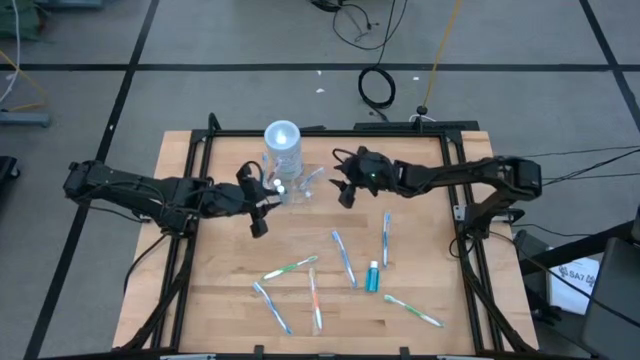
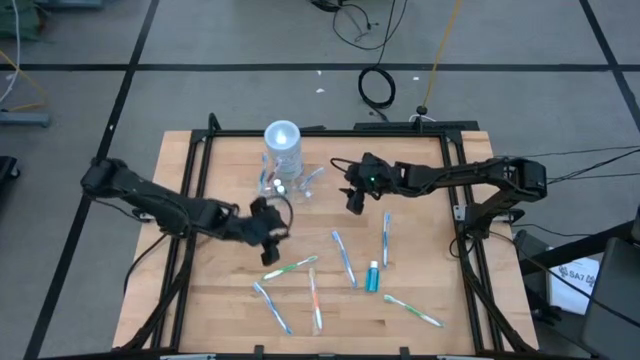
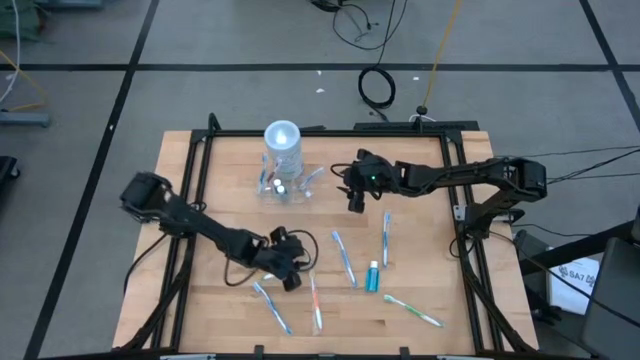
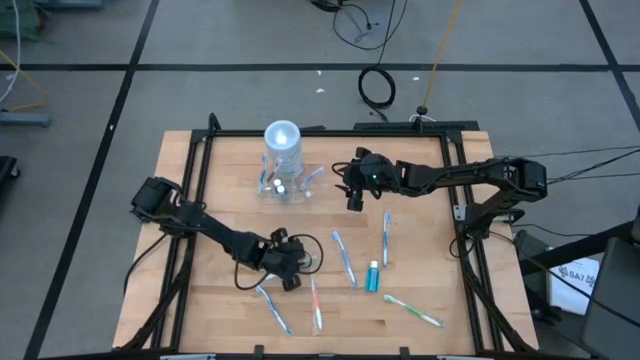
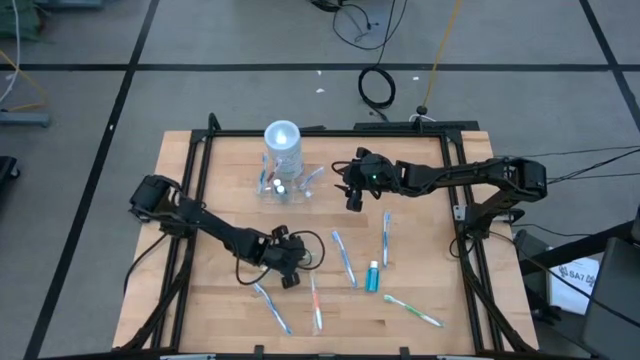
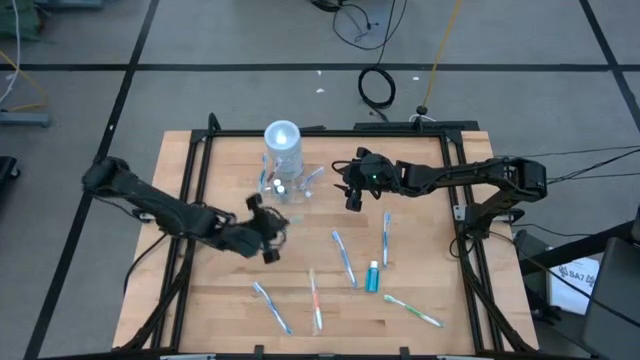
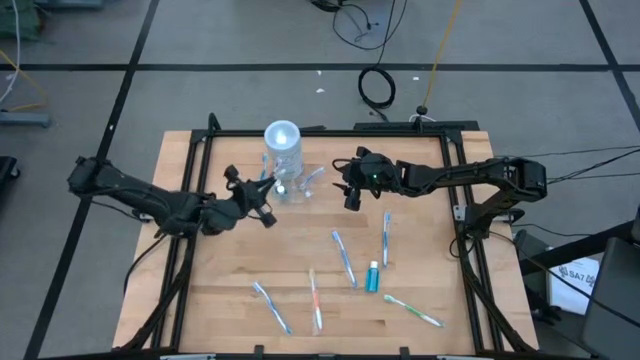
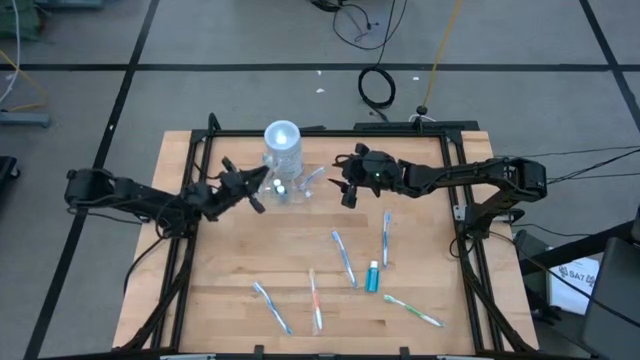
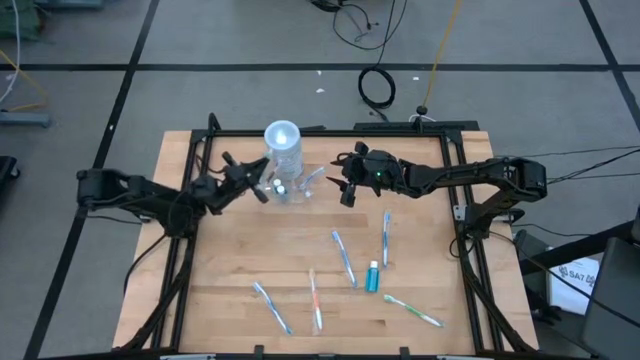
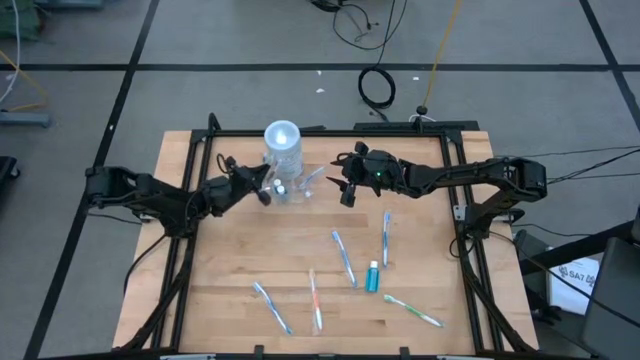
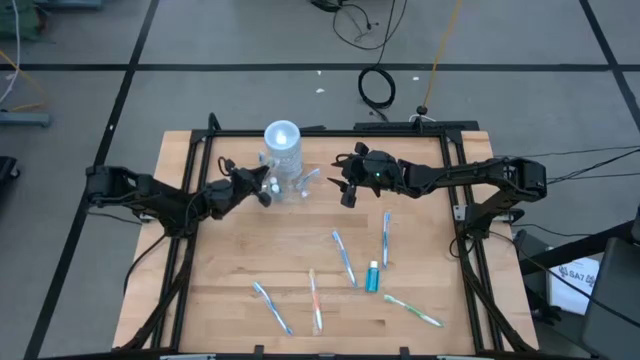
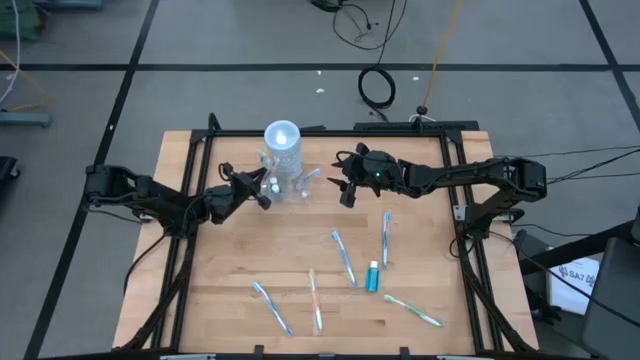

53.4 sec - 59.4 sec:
Task: Pick & Place toothbrushing station
Put the top green toothbrush into the transparent organizer

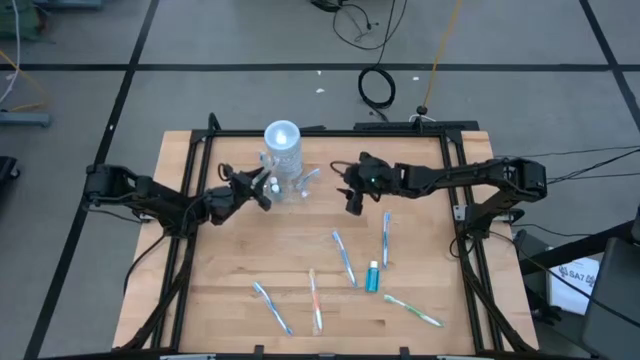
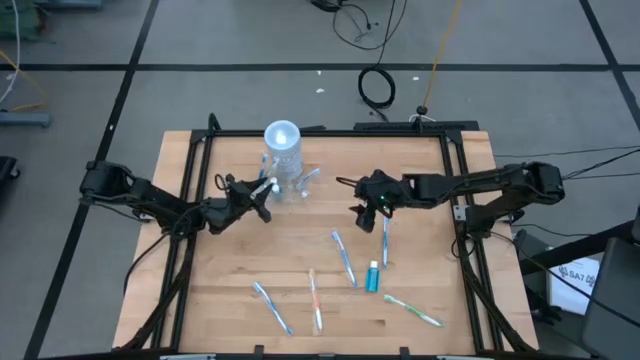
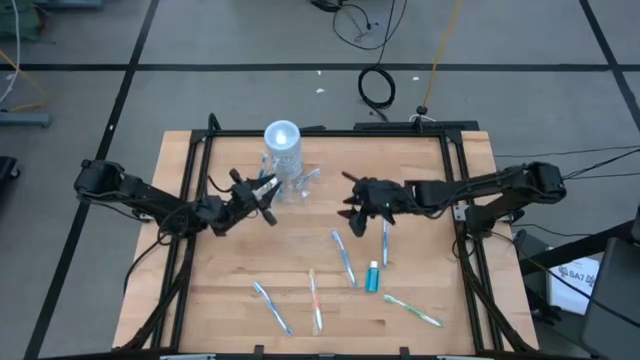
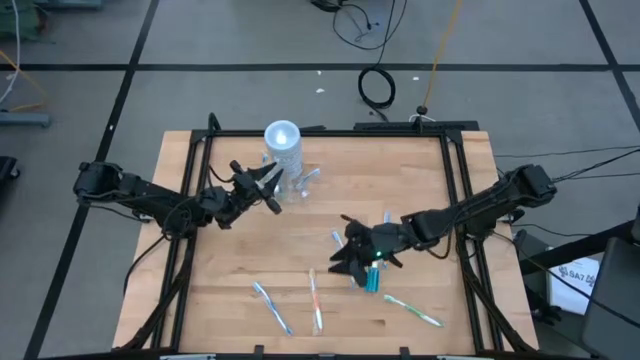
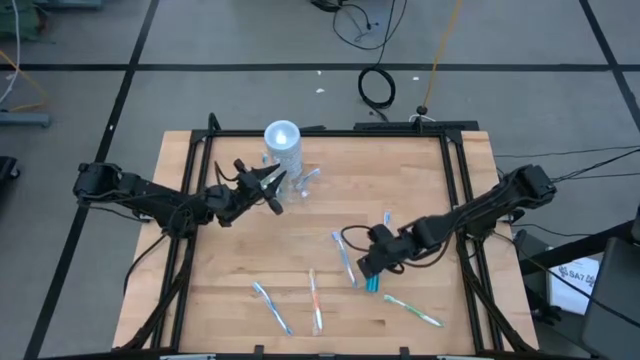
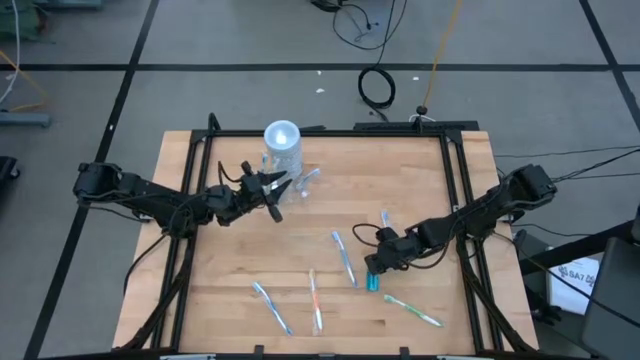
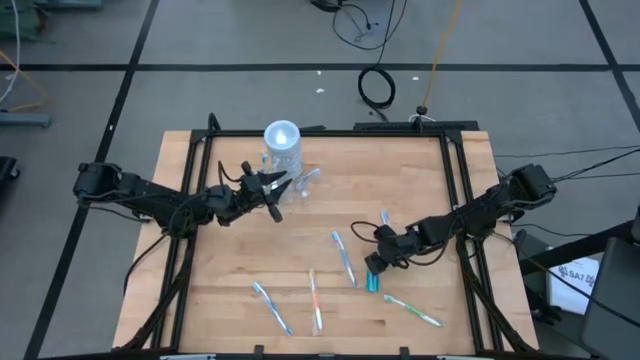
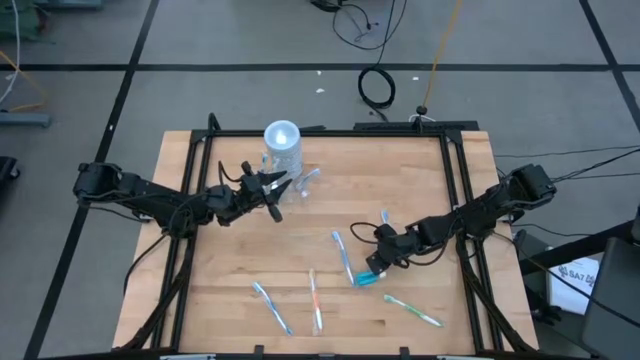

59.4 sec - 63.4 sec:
Put the blue mouthwash into the transparent organizer

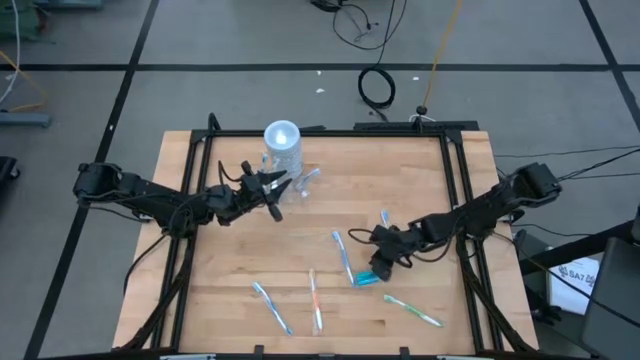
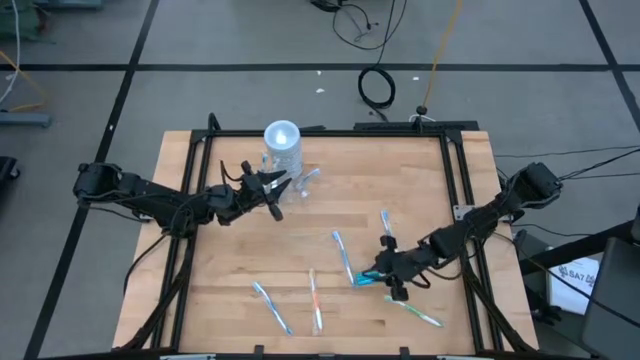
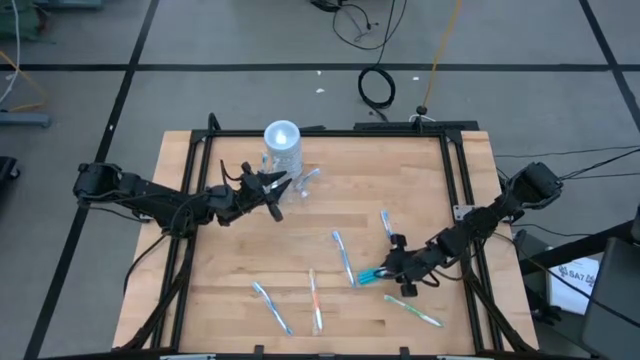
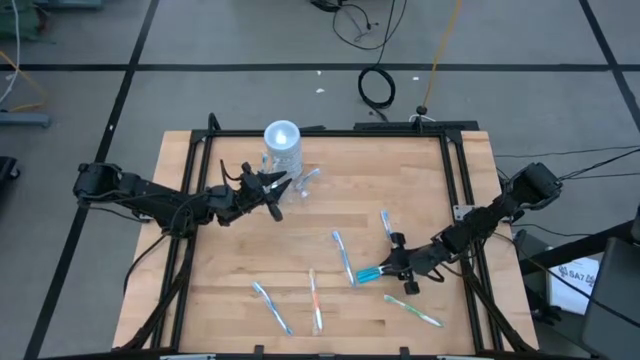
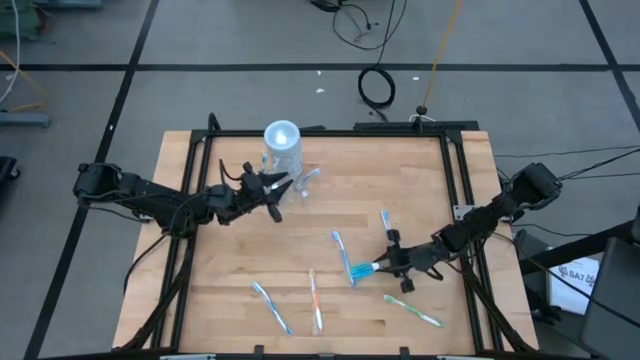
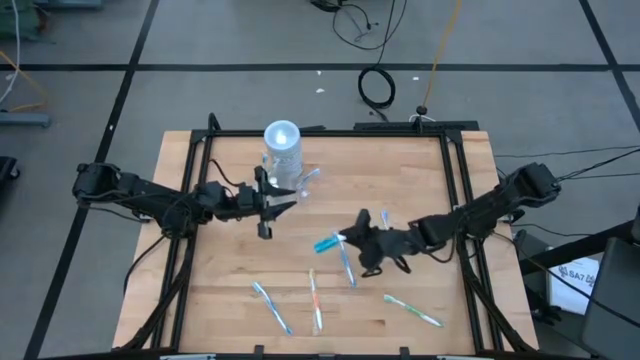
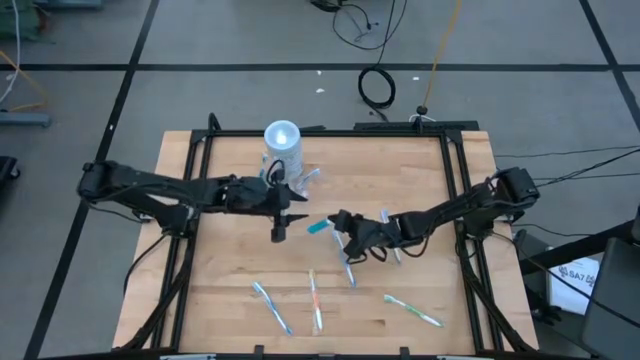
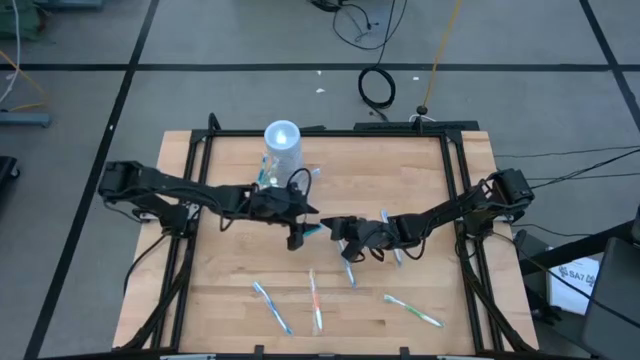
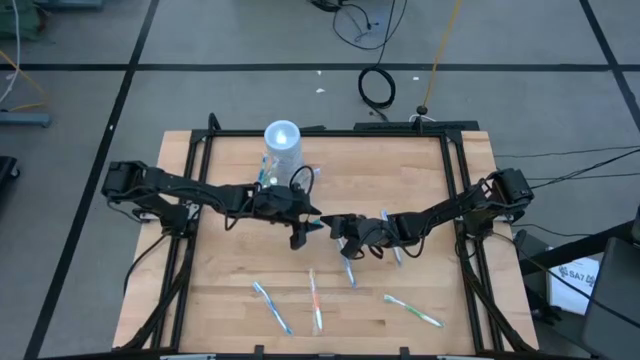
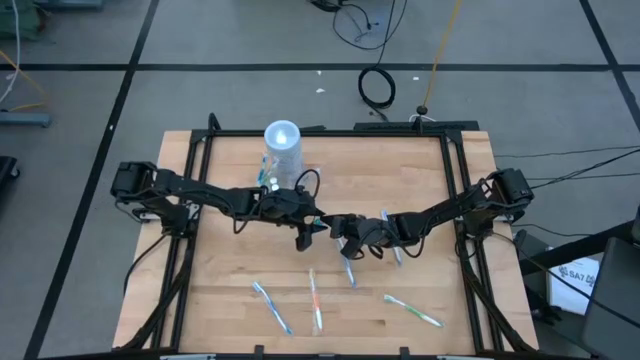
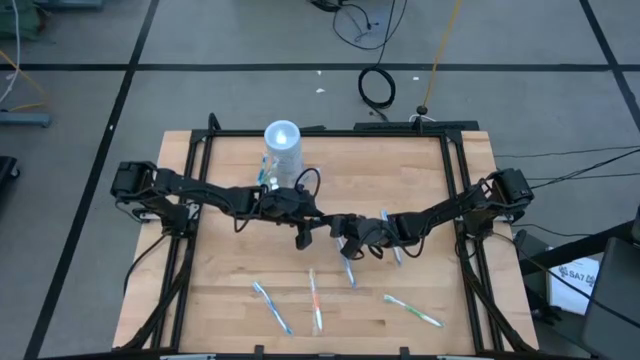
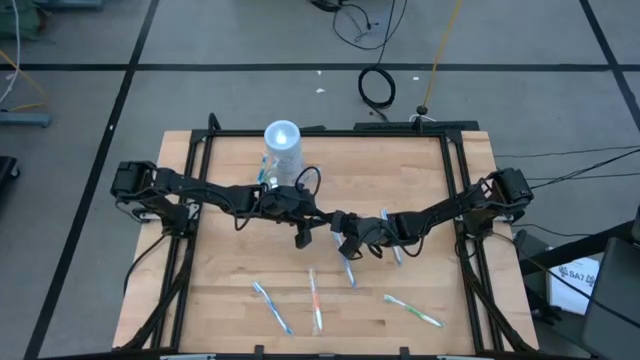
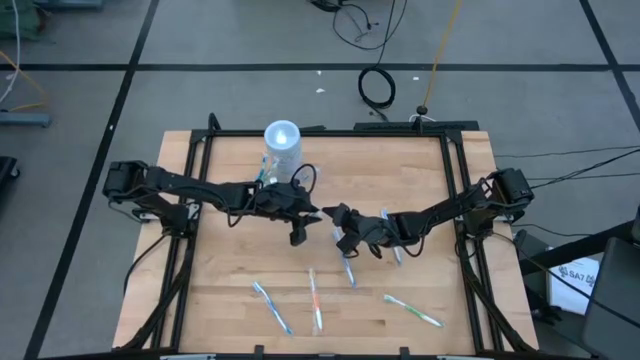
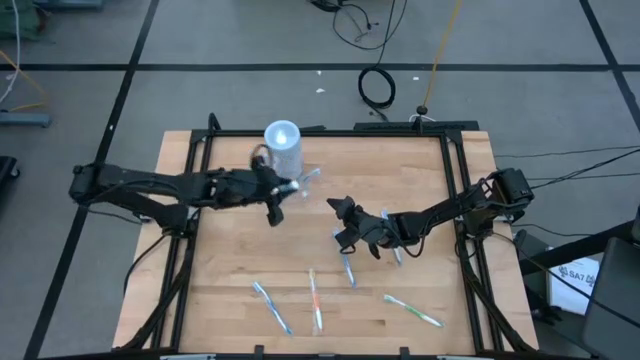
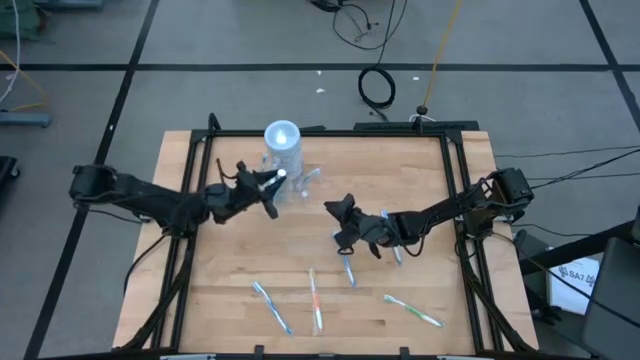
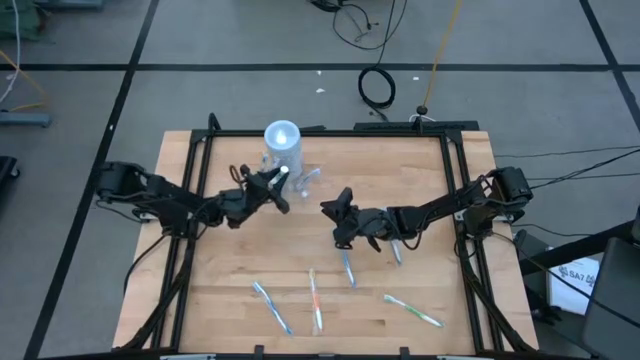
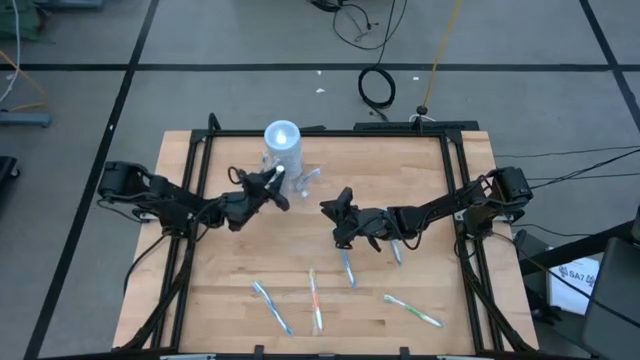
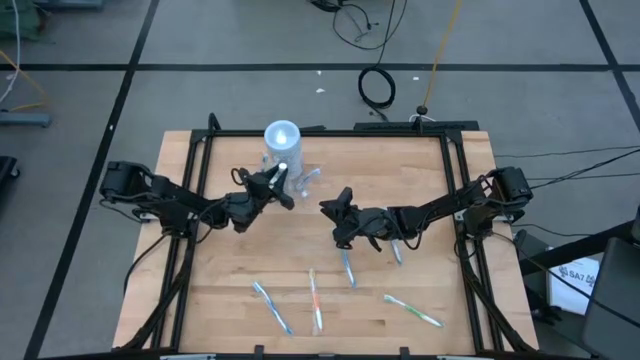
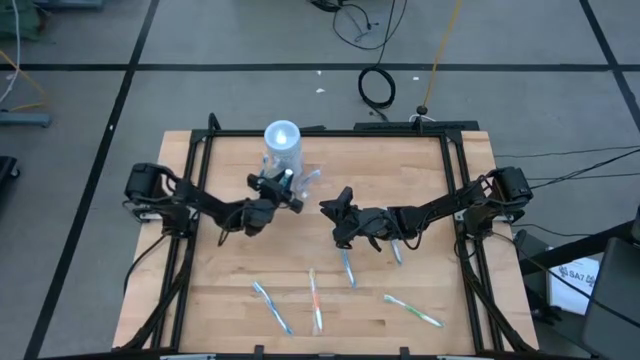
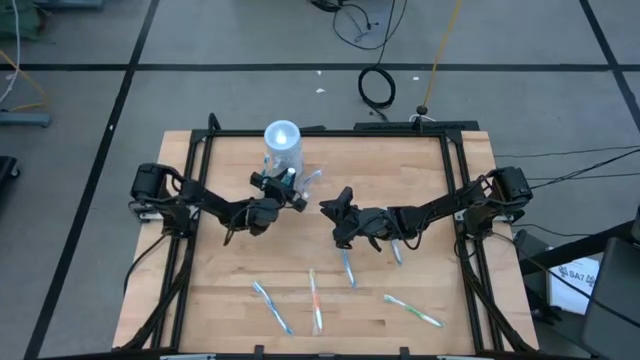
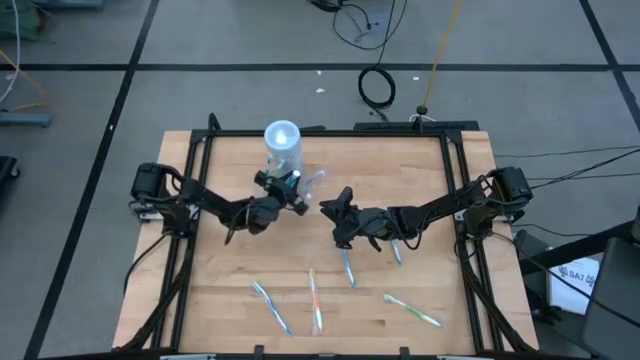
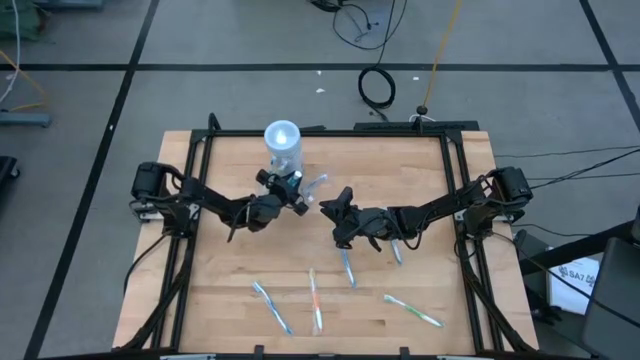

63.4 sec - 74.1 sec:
Put the blue mouthwash into the transparent organizer
